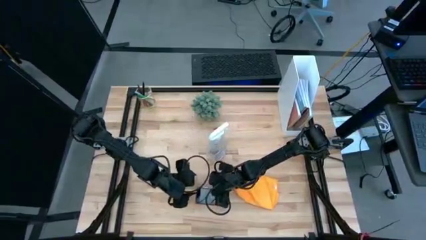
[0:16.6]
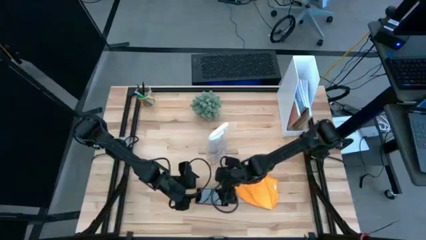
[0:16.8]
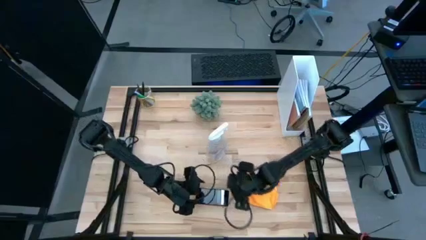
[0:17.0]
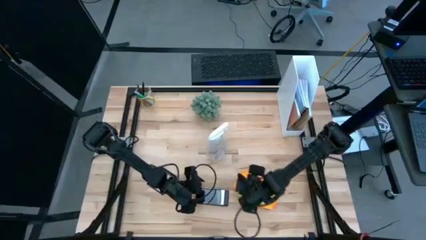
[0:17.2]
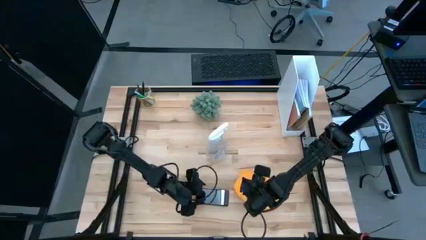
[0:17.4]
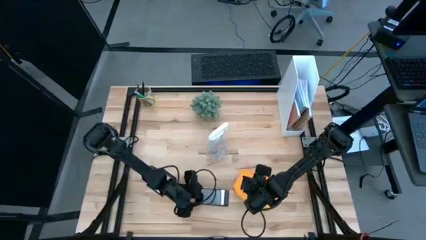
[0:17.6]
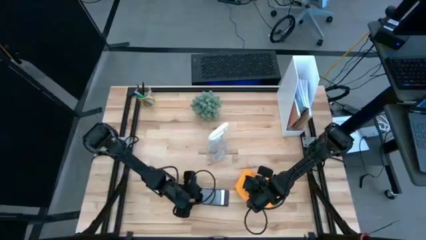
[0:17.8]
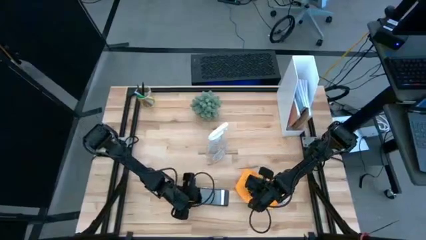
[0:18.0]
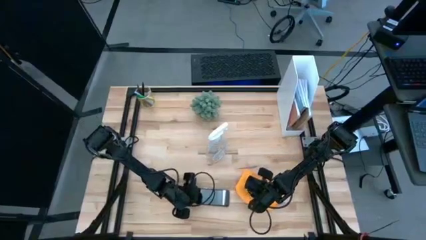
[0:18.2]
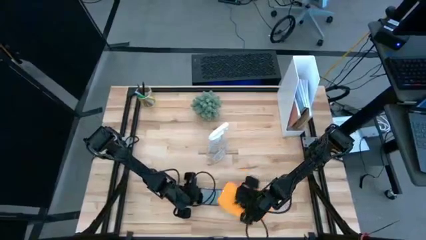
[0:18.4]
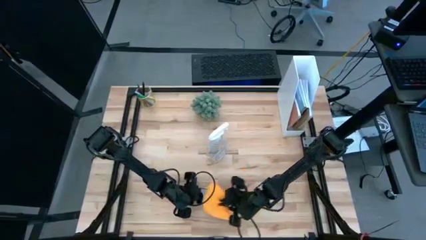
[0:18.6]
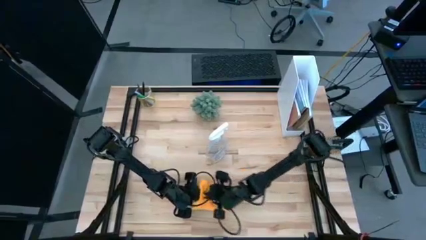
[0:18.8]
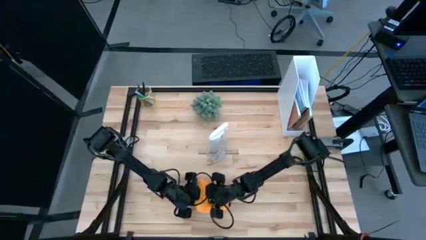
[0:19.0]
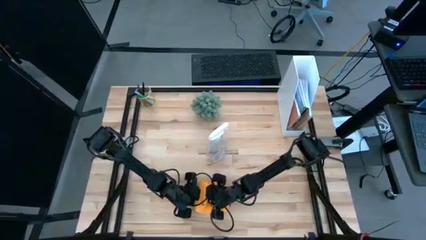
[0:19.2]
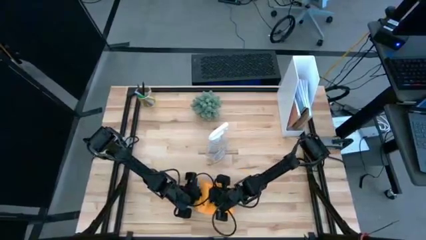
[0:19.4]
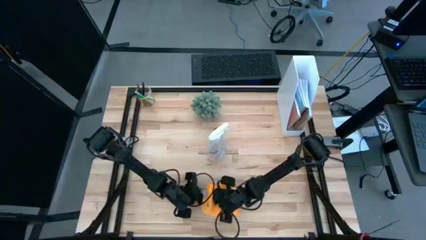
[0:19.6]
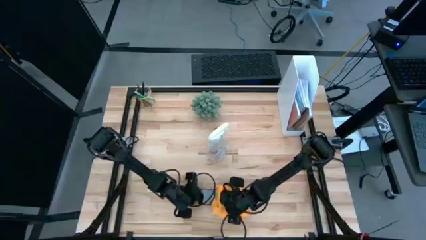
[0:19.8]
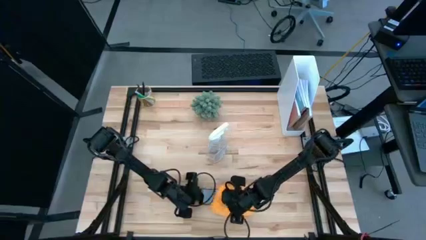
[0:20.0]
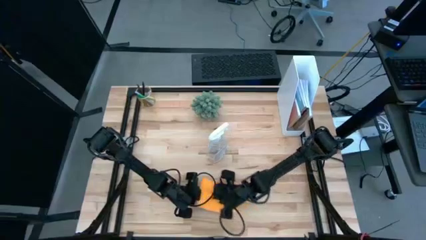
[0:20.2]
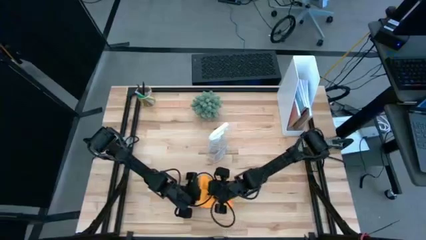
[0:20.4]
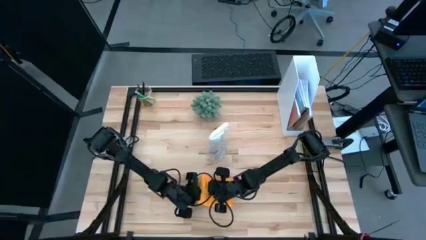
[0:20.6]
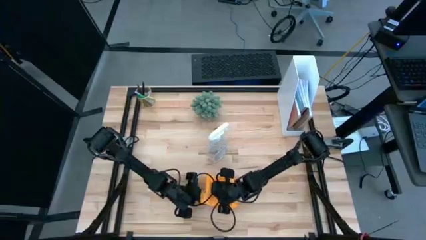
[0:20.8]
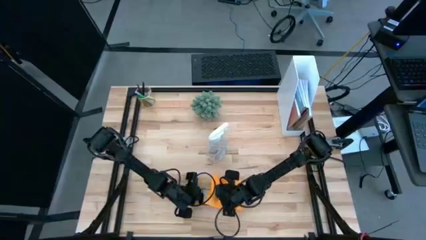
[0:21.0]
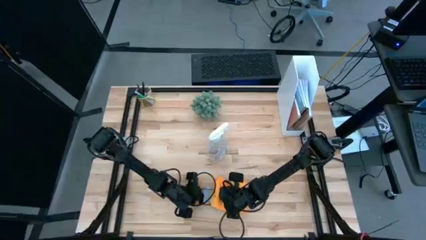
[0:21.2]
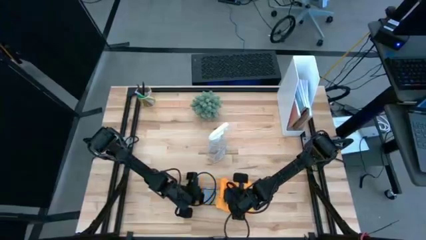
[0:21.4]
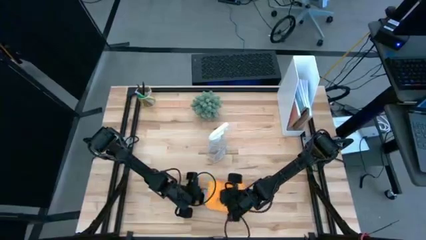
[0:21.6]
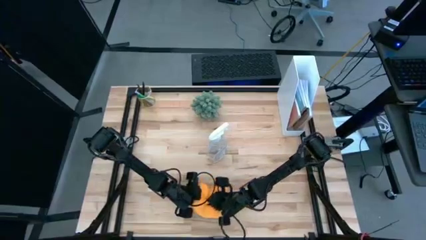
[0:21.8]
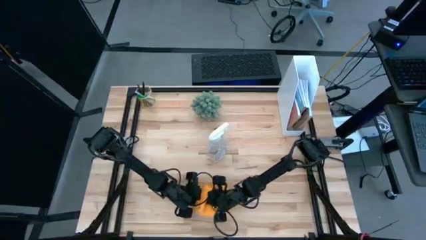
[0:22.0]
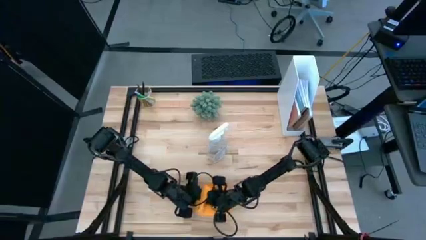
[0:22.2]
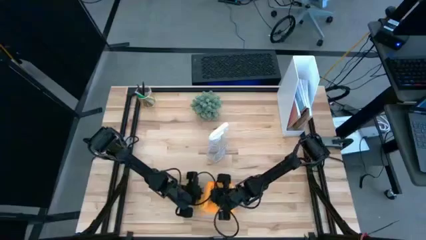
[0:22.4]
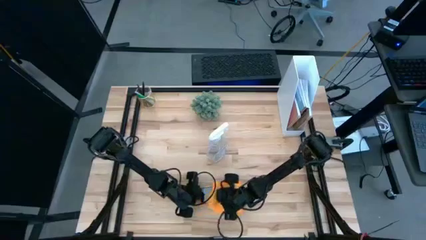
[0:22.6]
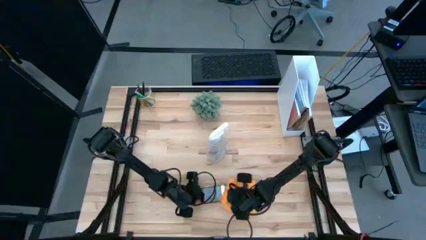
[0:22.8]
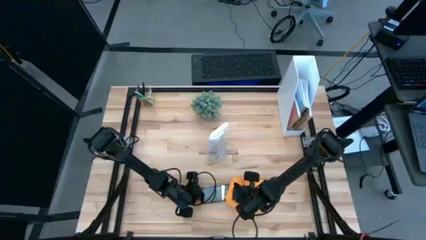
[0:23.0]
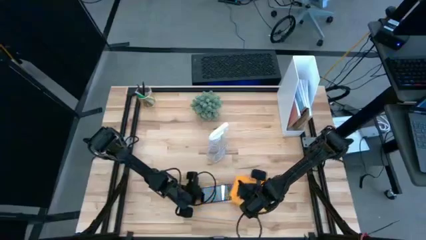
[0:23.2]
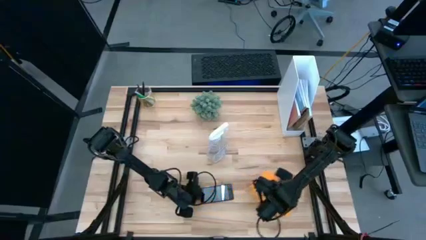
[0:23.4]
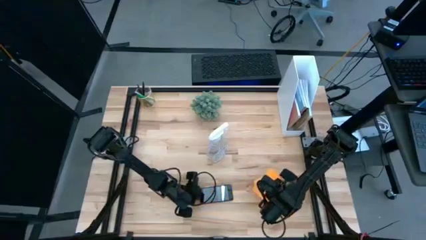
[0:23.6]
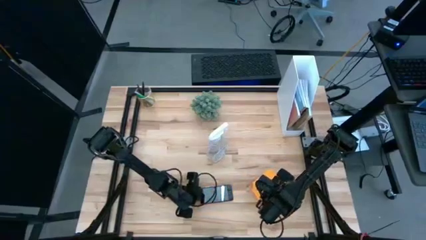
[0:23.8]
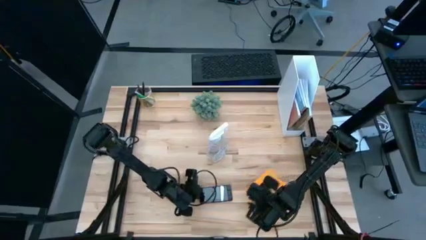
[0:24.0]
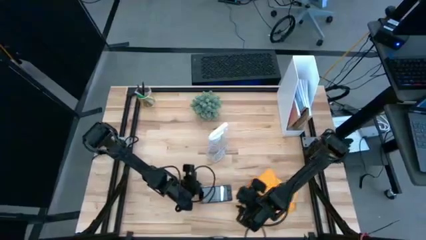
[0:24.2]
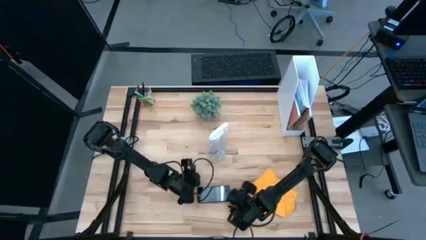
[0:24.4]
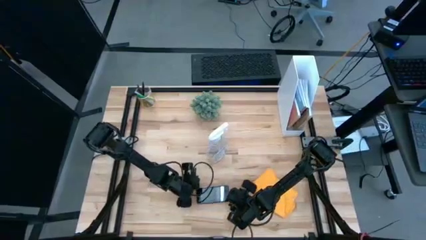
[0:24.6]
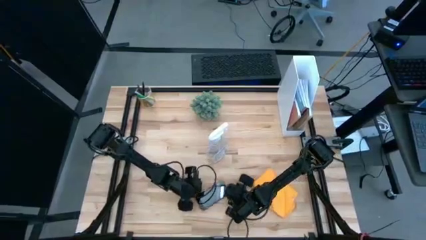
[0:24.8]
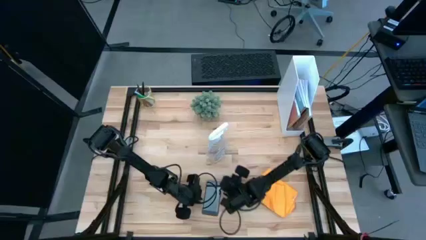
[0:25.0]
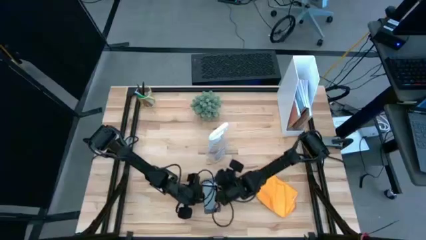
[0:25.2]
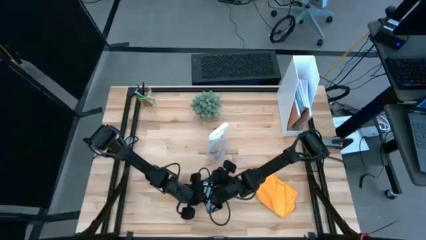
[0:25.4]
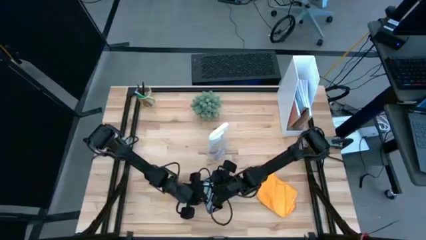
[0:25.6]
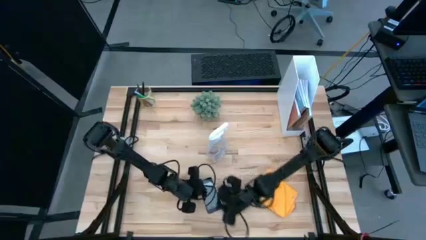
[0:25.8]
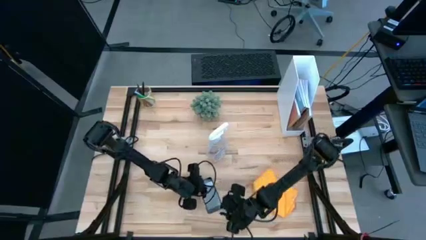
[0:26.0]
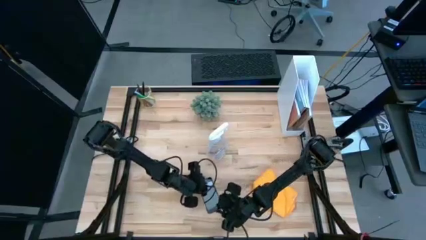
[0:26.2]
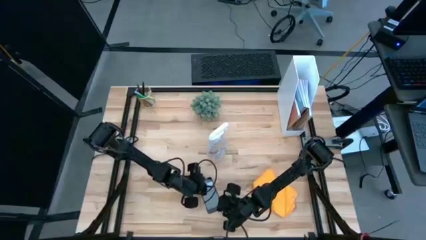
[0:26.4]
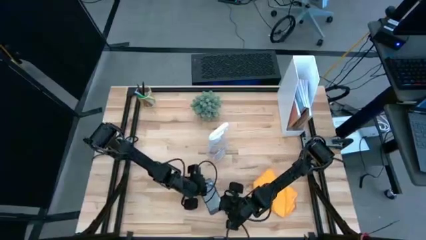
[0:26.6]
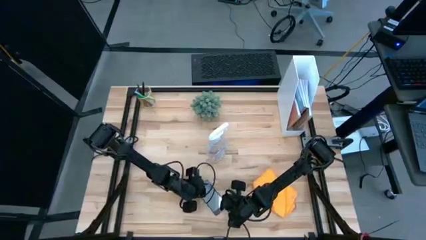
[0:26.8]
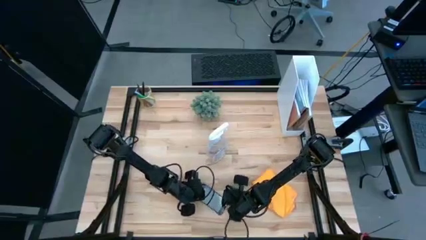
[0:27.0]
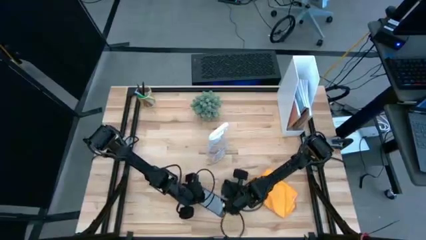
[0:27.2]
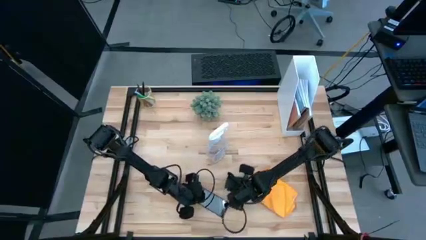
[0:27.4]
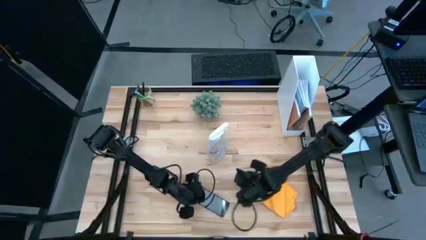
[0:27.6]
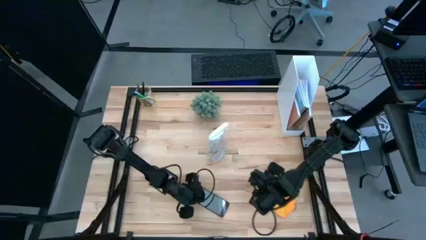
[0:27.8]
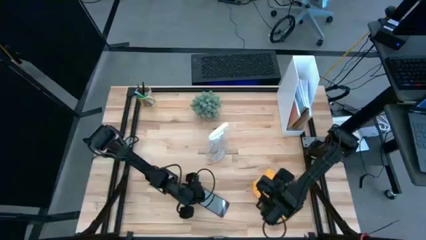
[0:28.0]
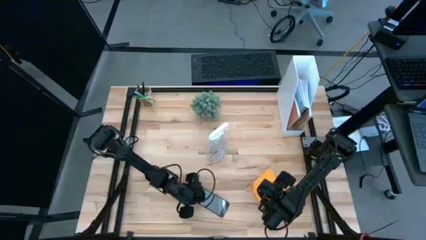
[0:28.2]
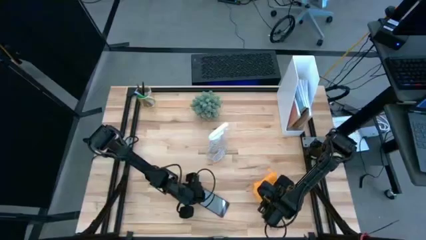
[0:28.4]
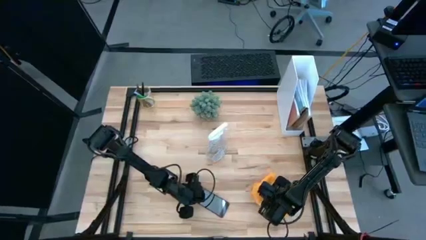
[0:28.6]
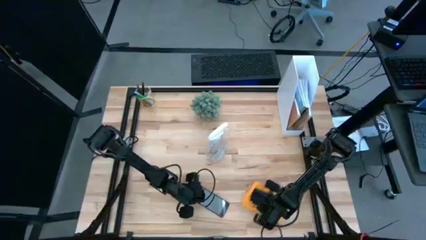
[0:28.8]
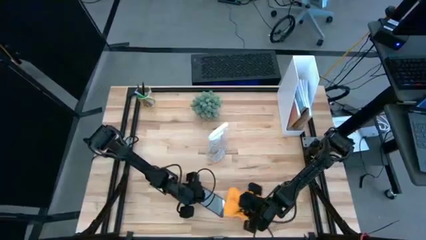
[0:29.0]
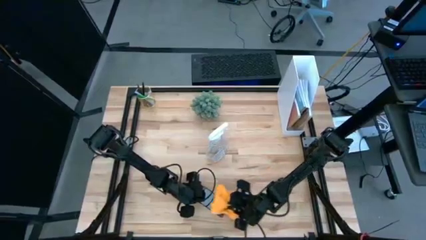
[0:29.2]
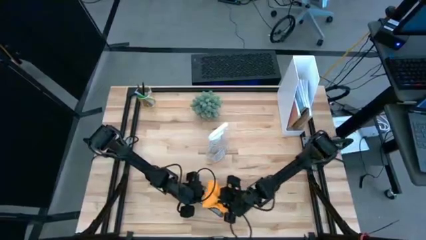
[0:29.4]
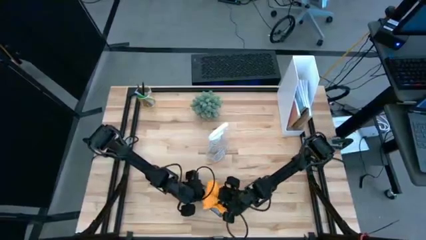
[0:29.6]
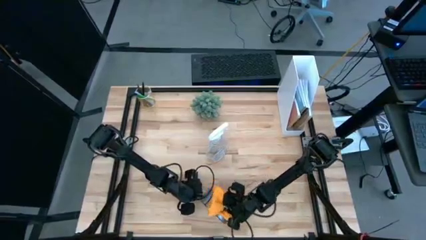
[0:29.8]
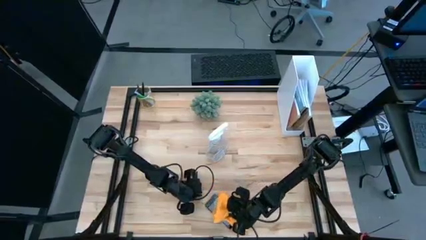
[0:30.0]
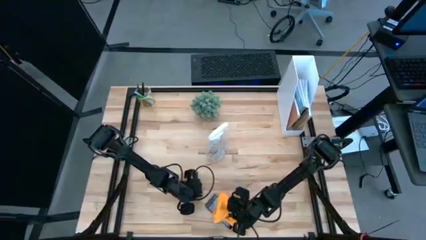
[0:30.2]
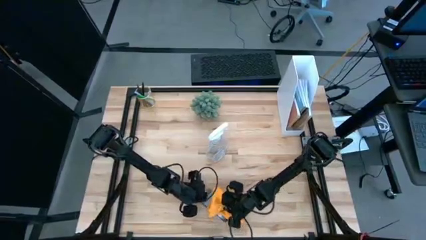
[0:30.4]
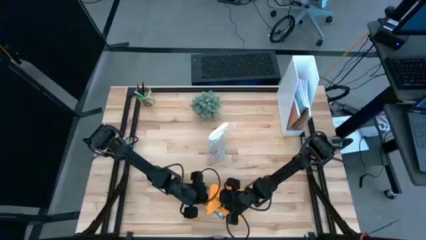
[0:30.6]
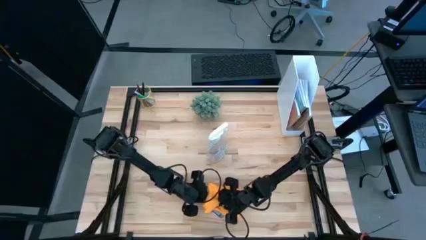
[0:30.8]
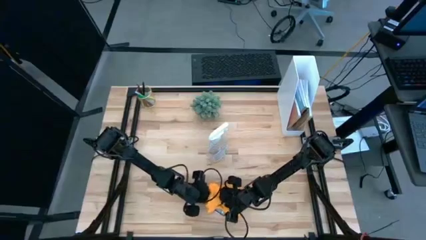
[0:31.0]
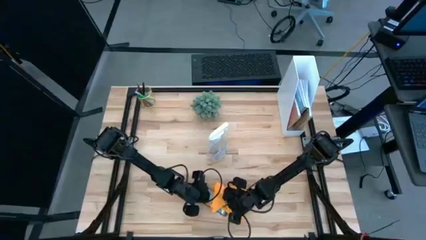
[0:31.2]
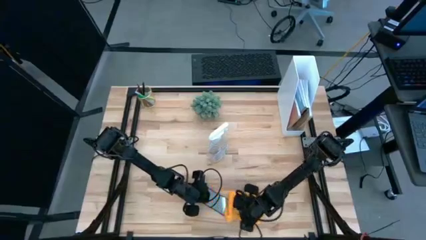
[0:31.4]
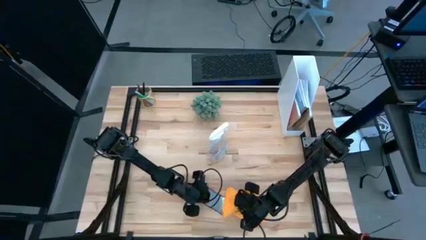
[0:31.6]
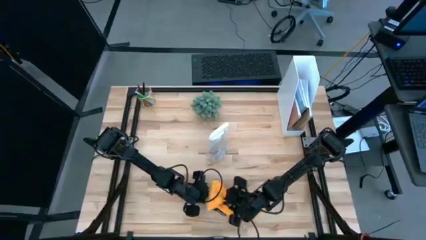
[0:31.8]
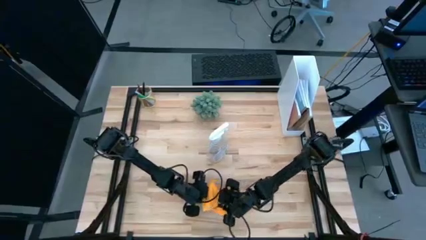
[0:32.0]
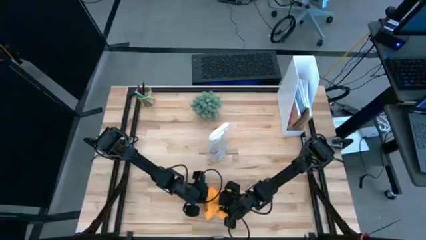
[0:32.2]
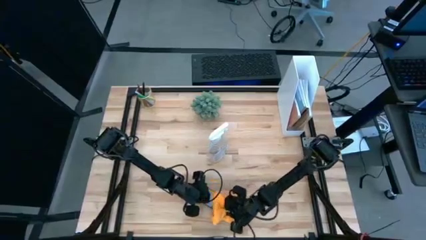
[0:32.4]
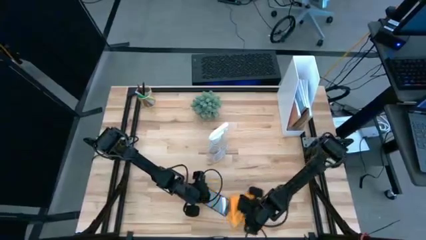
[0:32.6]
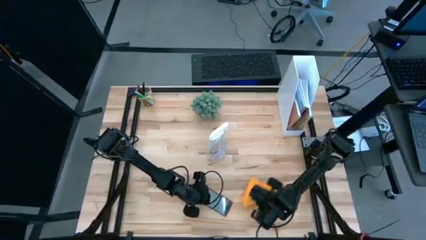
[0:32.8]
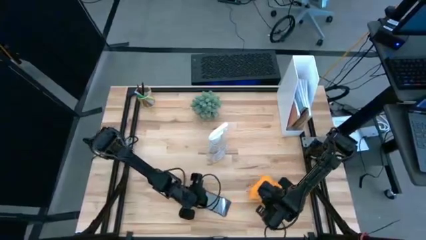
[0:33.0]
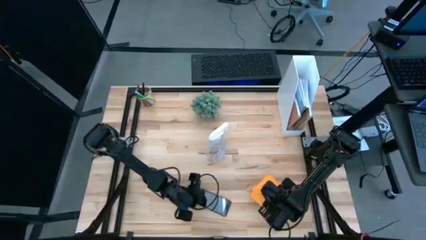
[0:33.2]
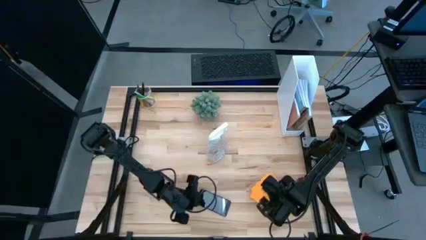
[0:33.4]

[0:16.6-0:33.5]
Task: Apply microfiber cloth
Wipe the front of the pink phone with the orange microfiber cloth
